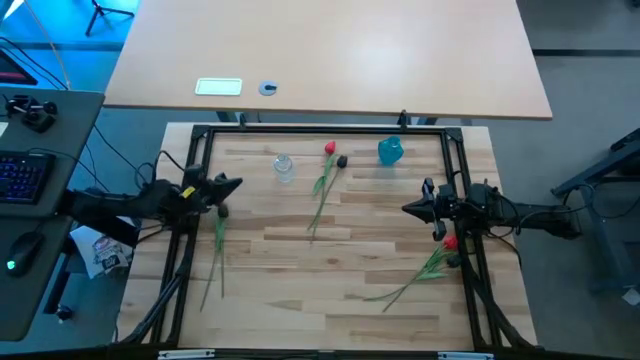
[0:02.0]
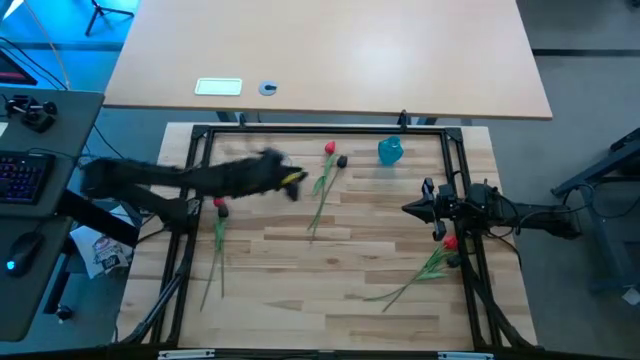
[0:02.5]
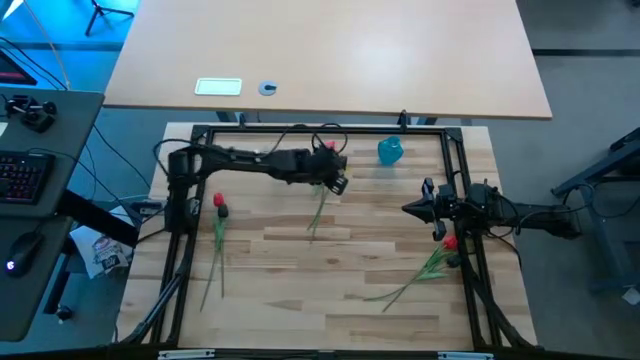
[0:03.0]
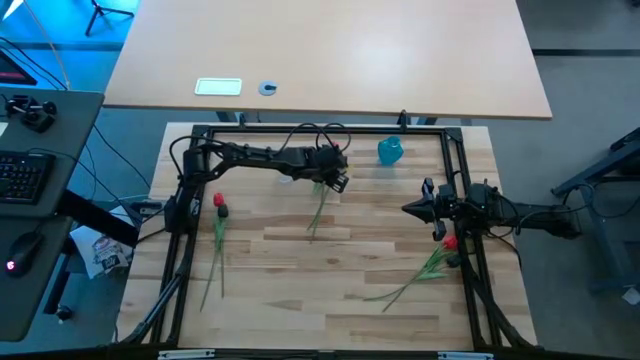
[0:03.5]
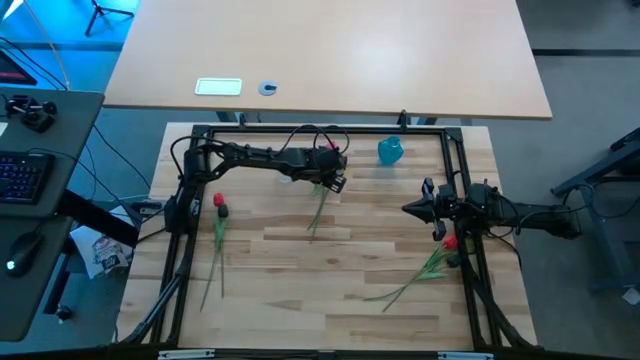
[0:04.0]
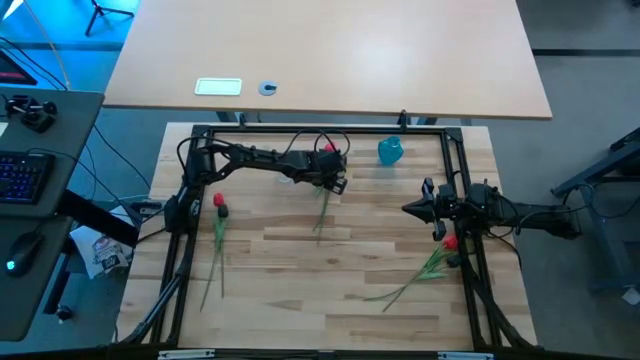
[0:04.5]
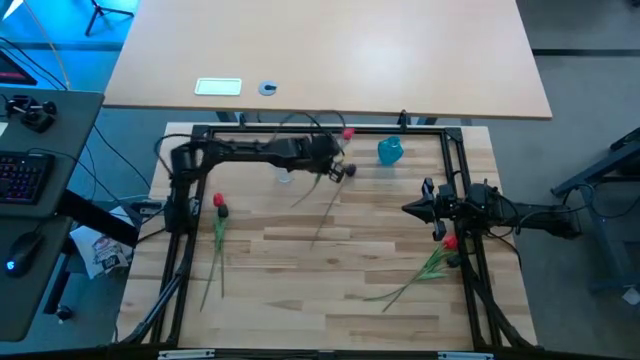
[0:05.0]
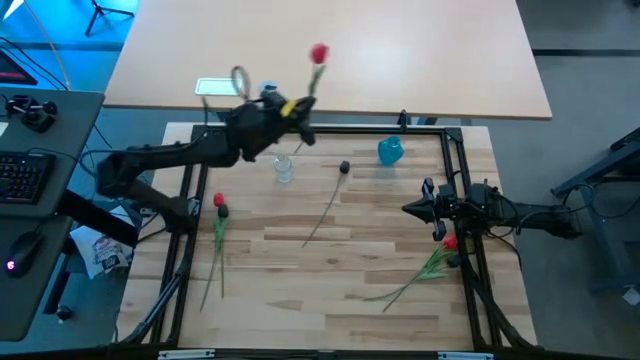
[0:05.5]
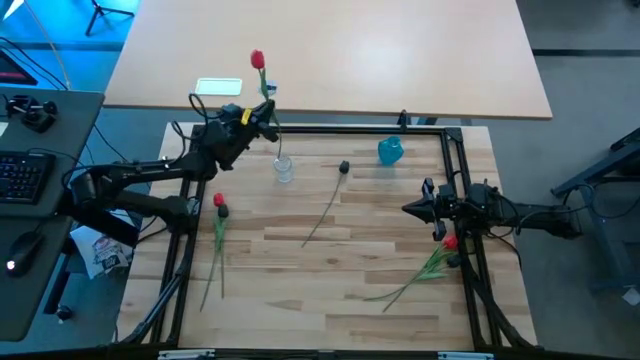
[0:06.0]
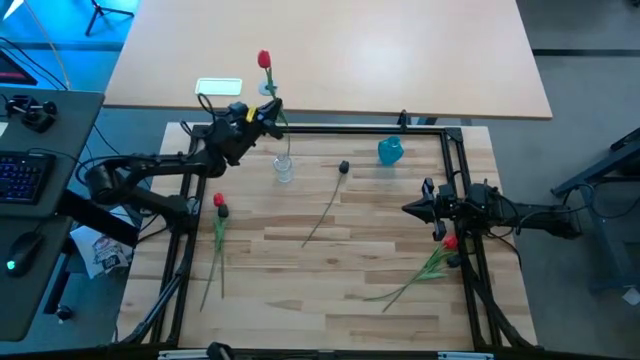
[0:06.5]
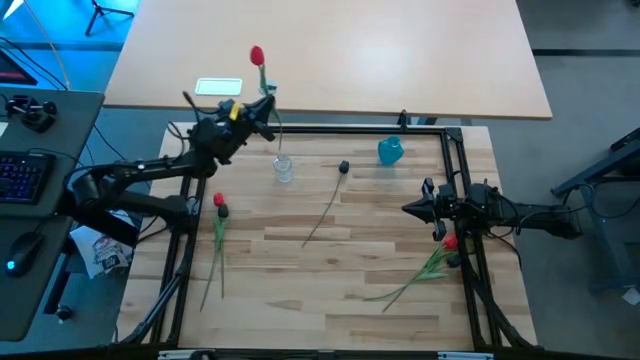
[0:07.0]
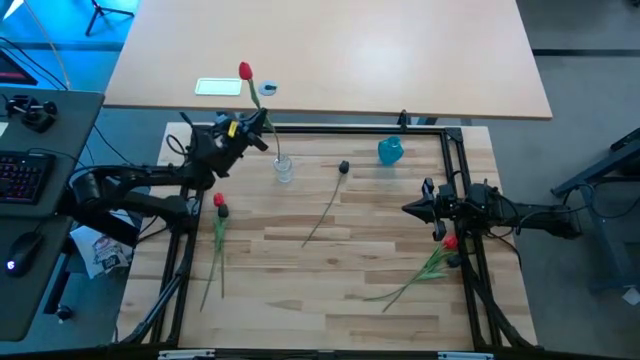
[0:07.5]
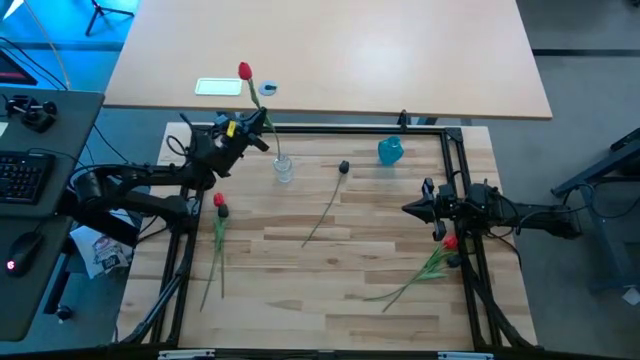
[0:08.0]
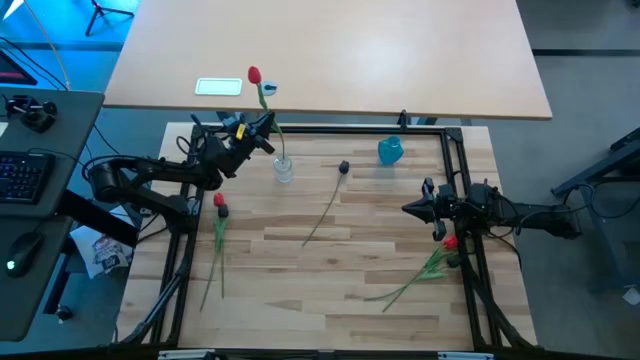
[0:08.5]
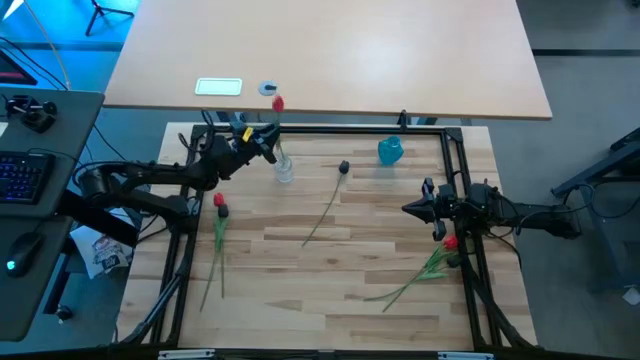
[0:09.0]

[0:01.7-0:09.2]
Task: Sort flowers into vase by color
Put the top red flower into the transparent vase

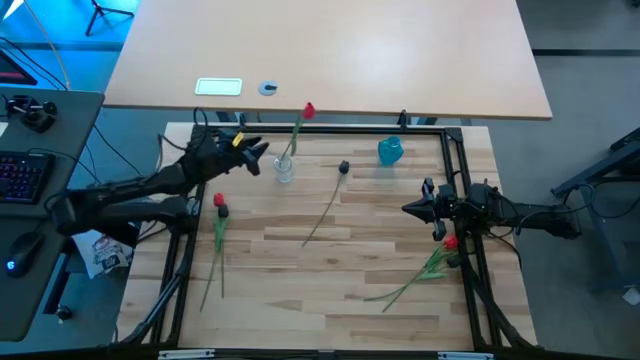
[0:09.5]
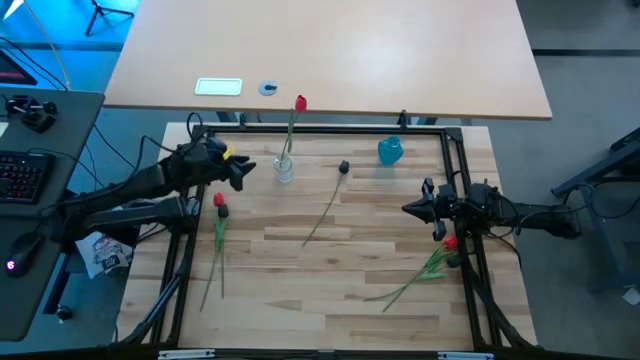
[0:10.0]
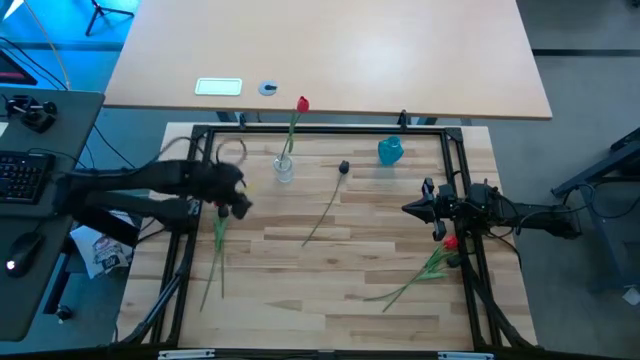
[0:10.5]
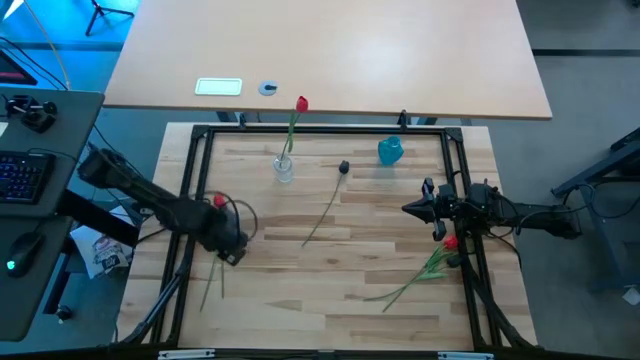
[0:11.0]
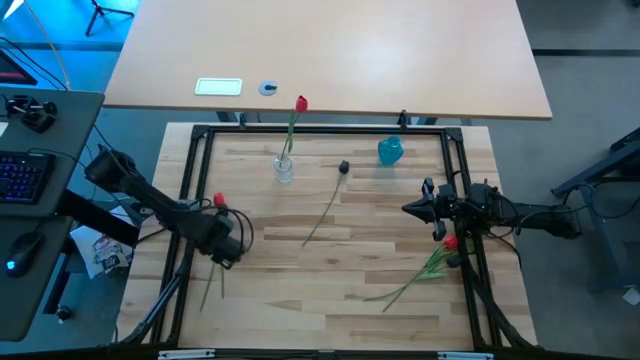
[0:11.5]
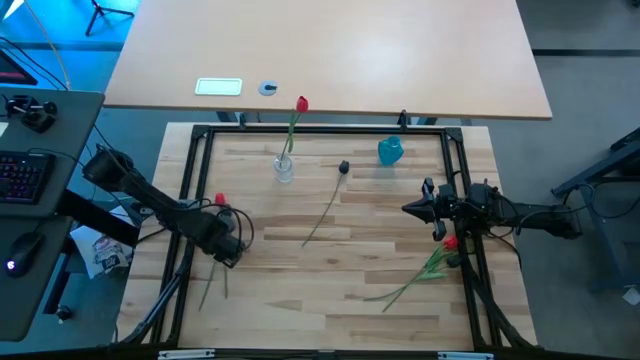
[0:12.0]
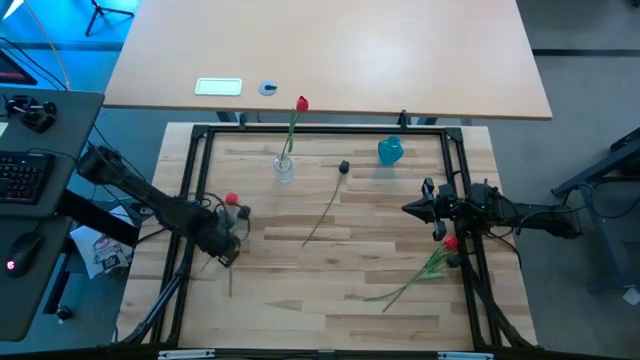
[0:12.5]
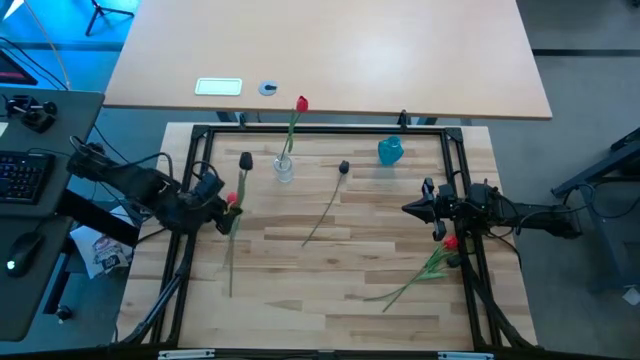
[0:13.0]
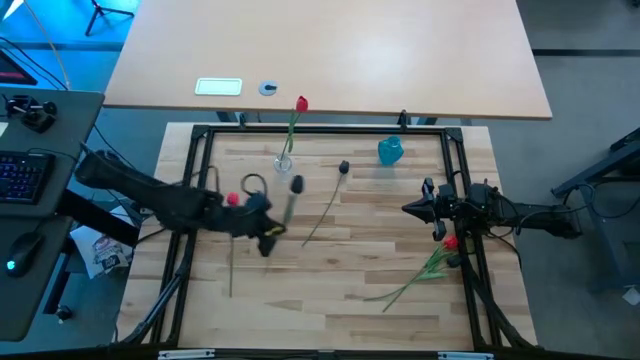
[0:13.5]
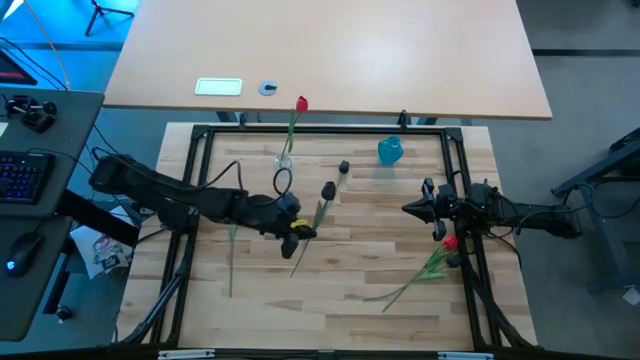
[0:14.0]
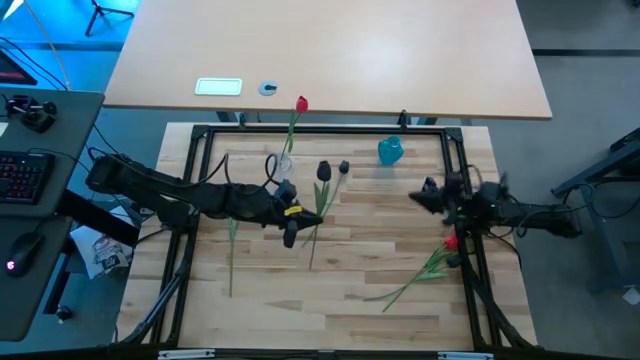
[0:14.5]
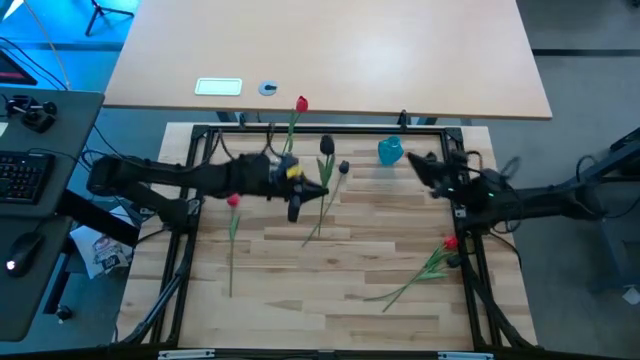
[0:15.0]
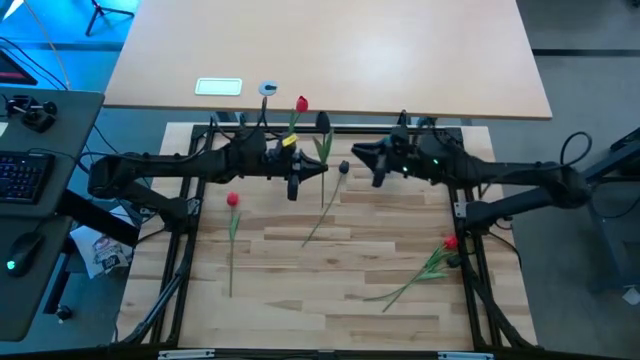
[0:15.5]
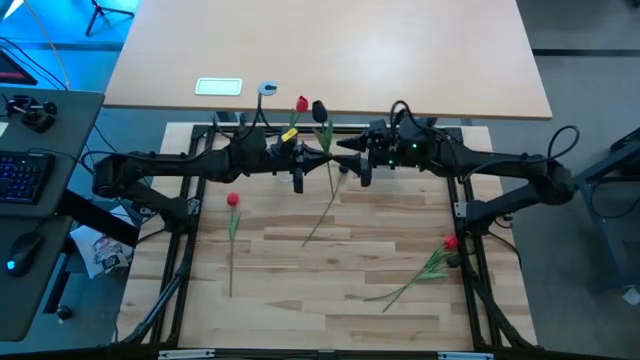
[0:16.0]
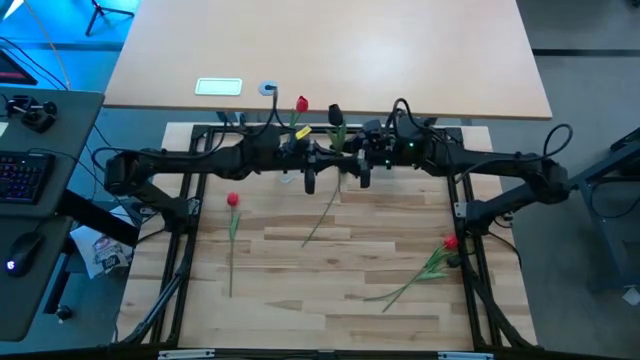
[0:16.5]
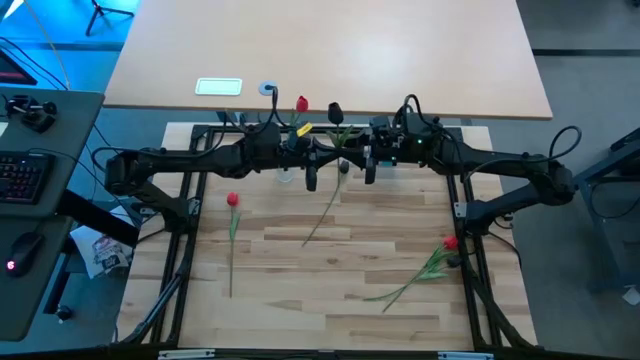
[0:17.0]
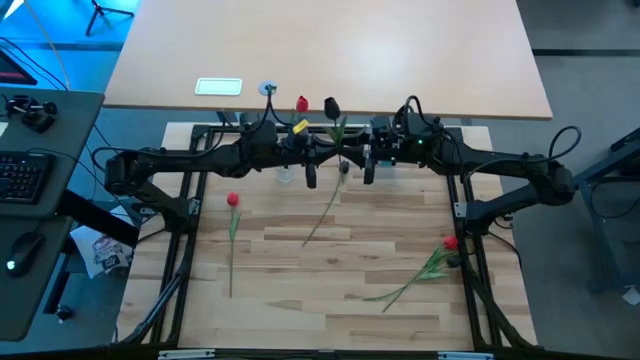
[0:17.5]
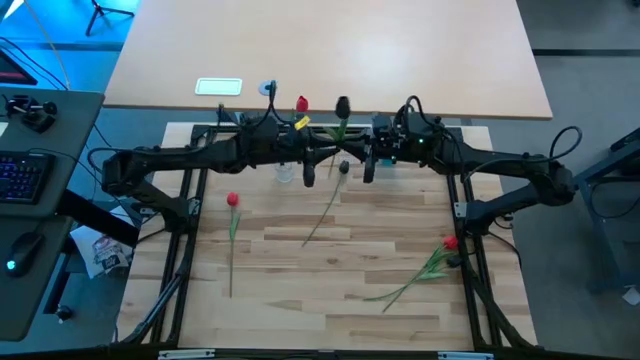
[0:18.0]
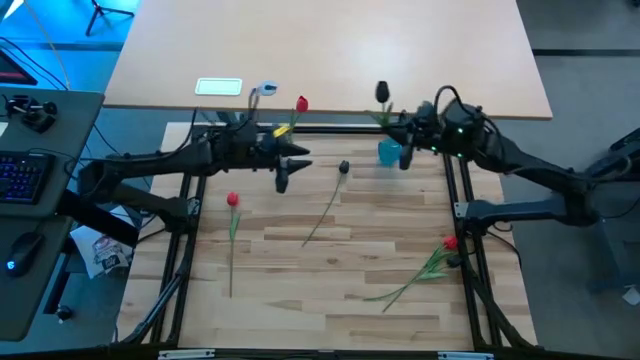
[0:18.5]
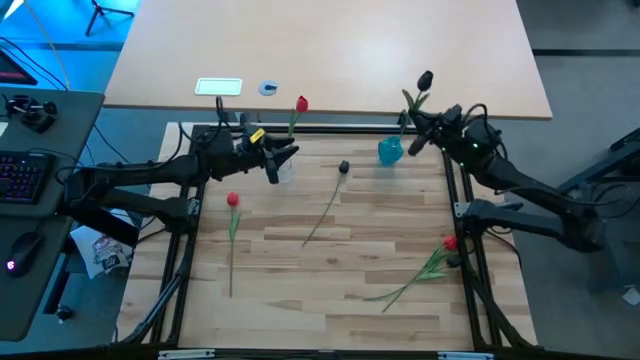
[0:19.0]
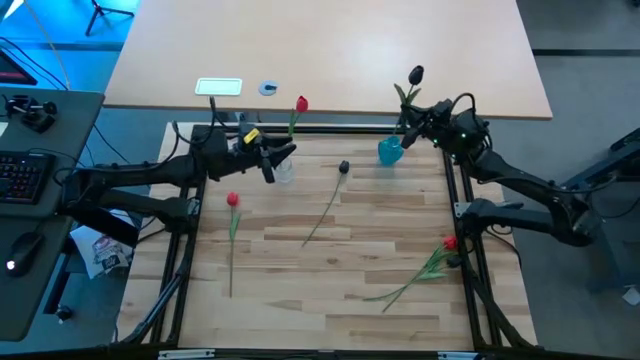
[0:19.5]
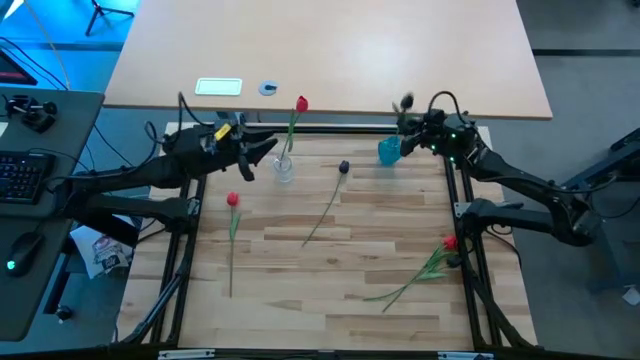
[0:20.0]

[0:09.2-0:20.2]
Put the left black flower into the blue vase

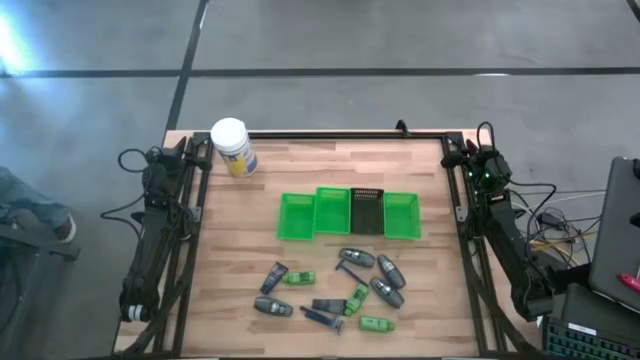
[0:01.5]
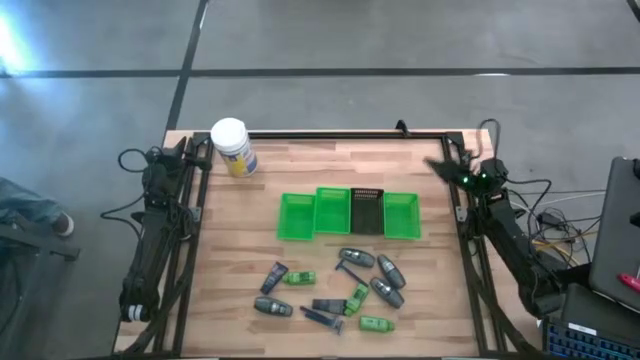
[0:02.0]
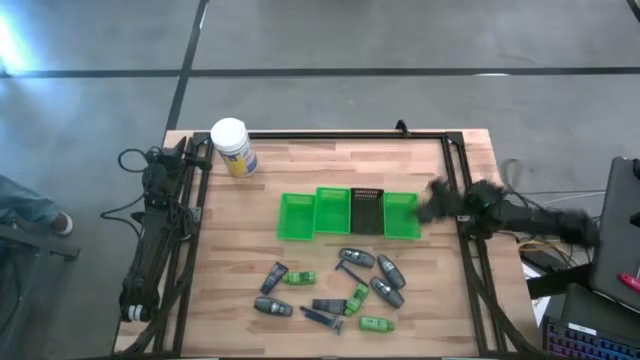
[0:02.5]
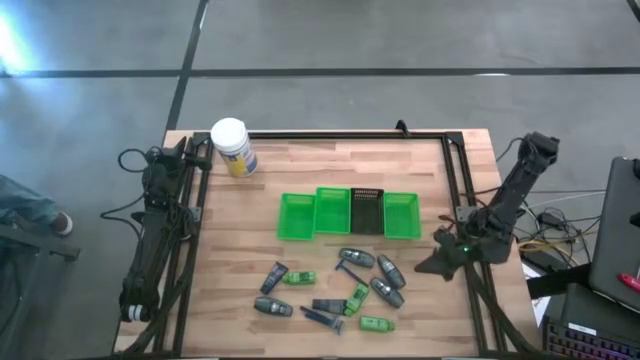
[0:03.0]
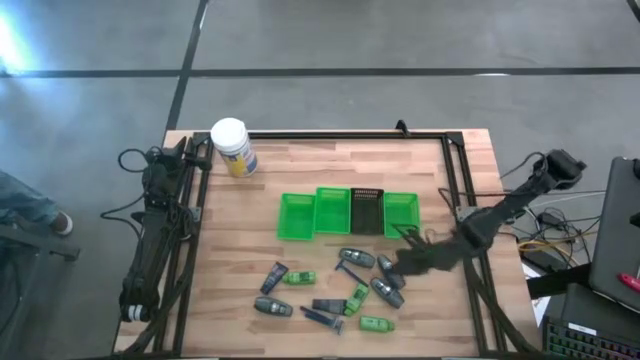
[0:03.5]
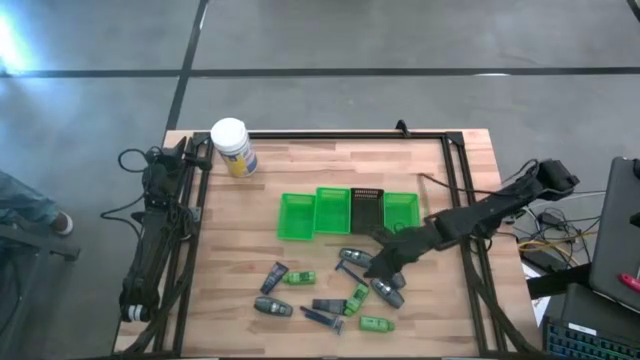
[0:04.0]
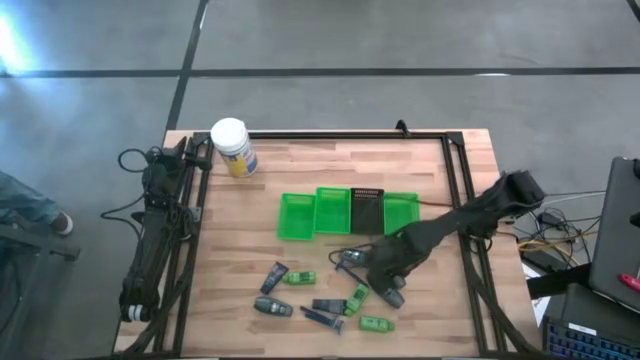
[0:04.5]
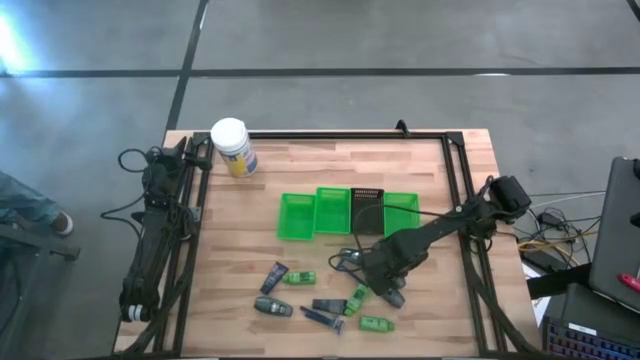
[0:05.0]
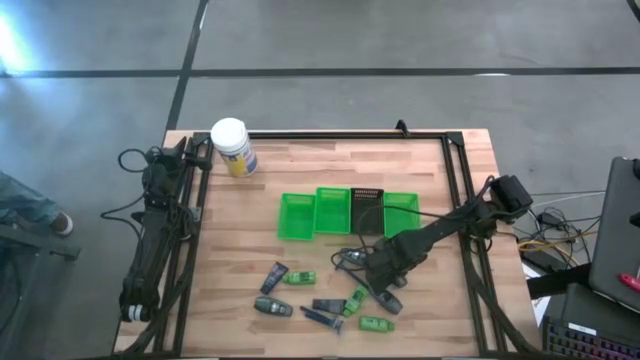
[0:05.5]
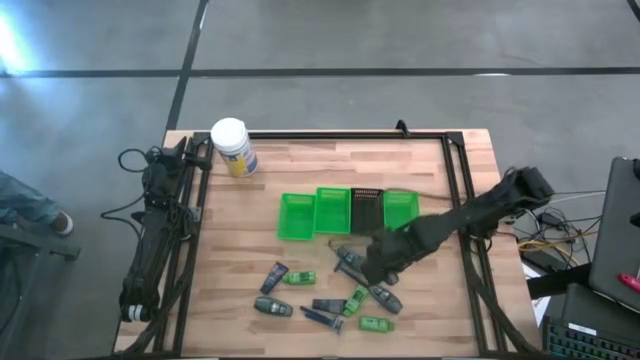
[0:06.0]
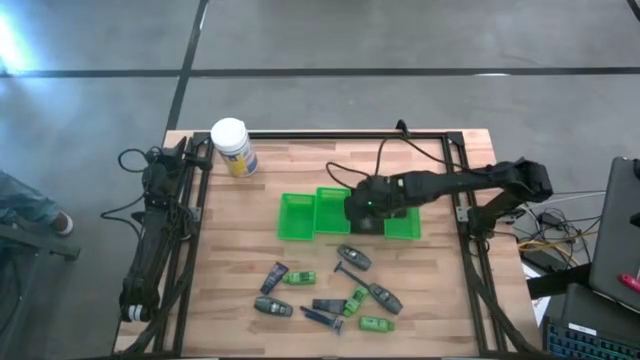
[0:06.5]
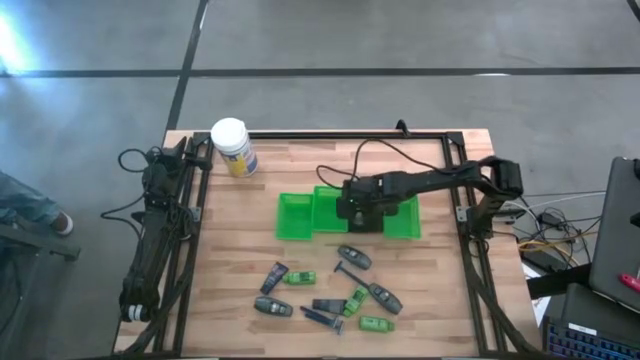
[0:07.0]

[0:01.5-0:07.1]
Task: Pick & Place Travel size toiletries
Put the gray deodorant into the black bin
